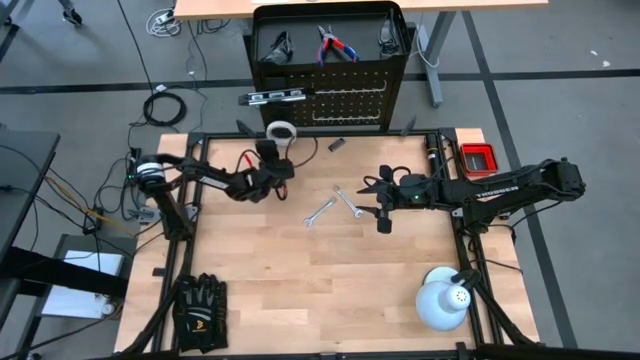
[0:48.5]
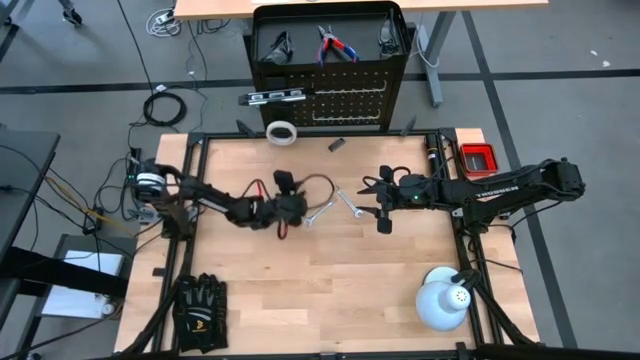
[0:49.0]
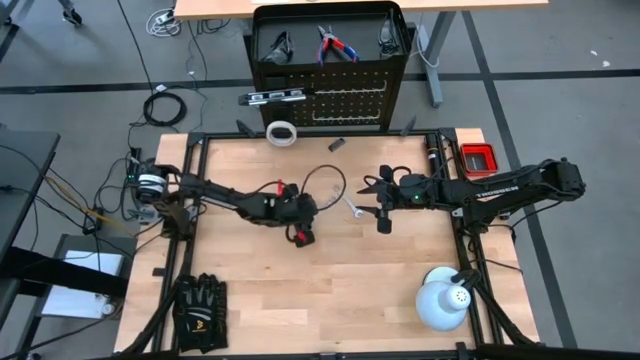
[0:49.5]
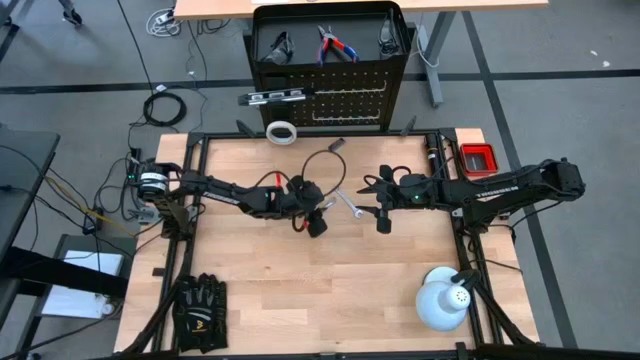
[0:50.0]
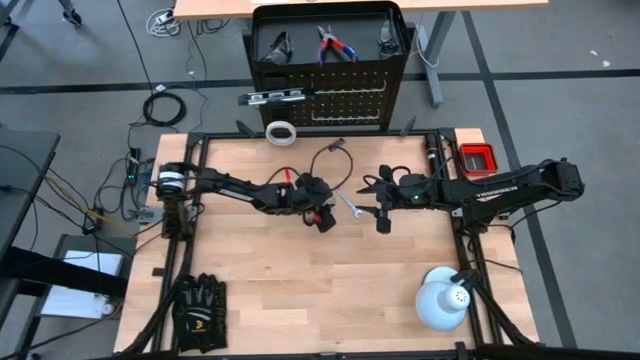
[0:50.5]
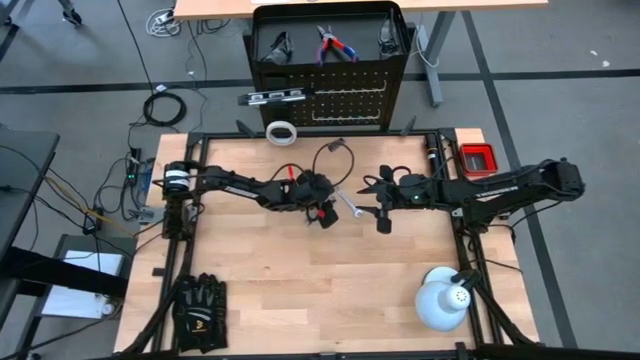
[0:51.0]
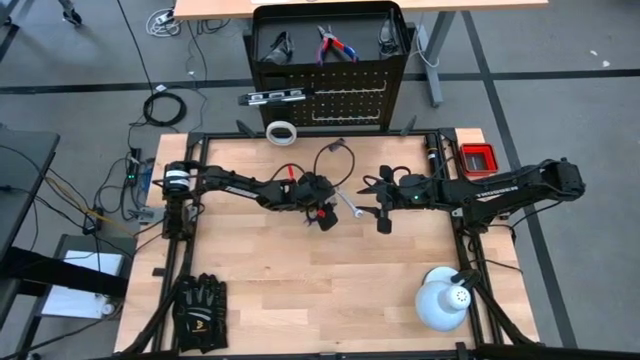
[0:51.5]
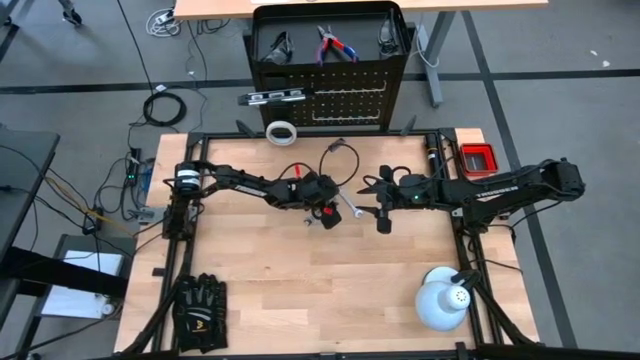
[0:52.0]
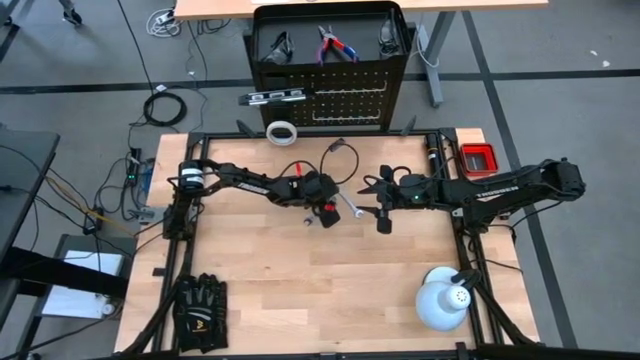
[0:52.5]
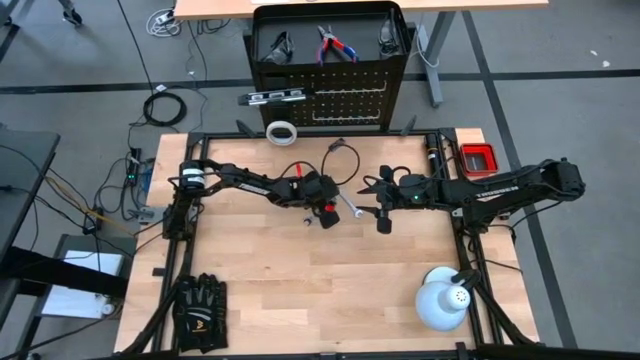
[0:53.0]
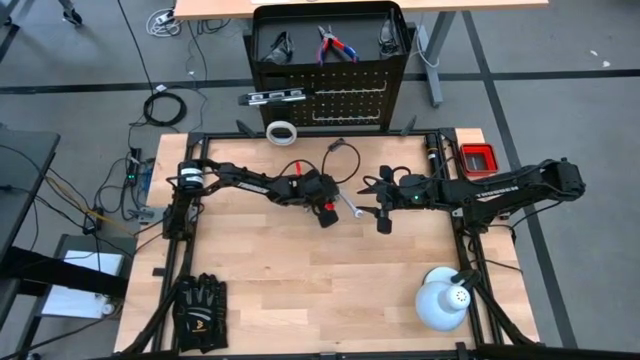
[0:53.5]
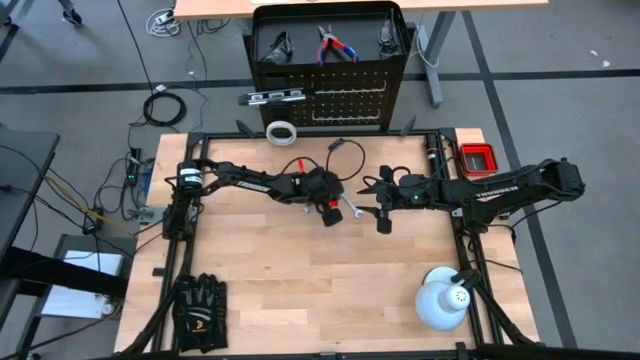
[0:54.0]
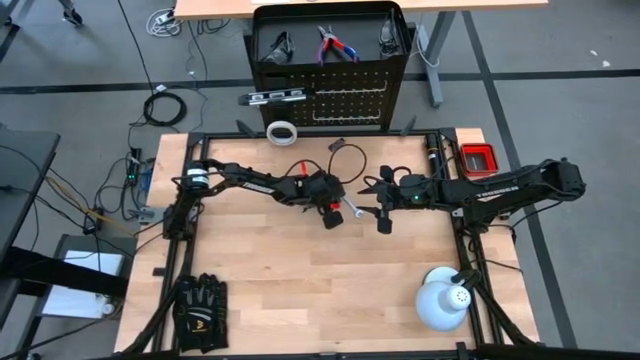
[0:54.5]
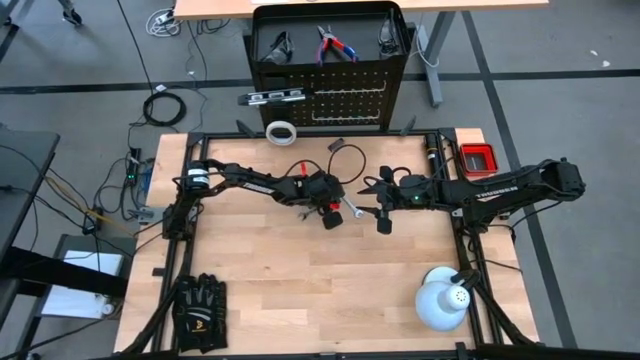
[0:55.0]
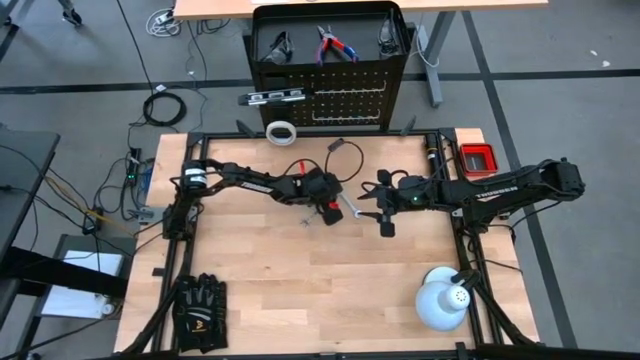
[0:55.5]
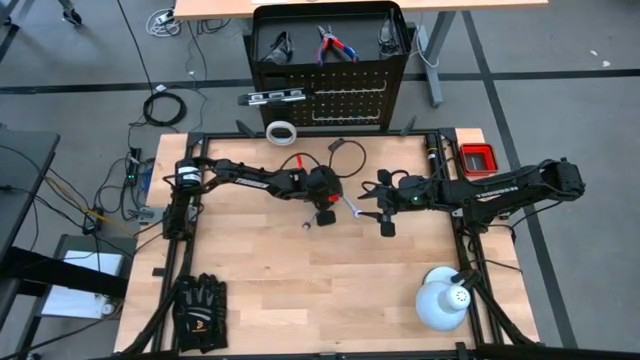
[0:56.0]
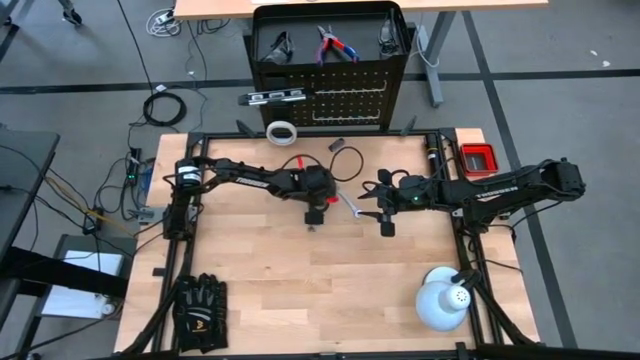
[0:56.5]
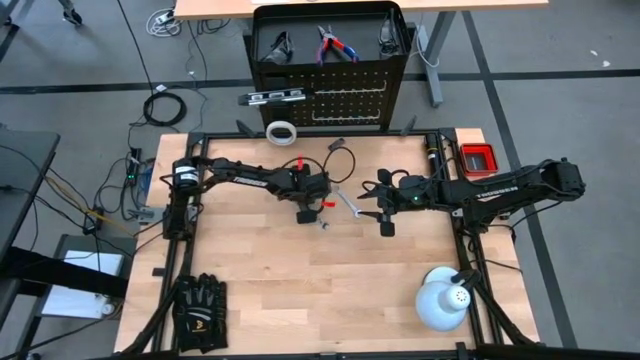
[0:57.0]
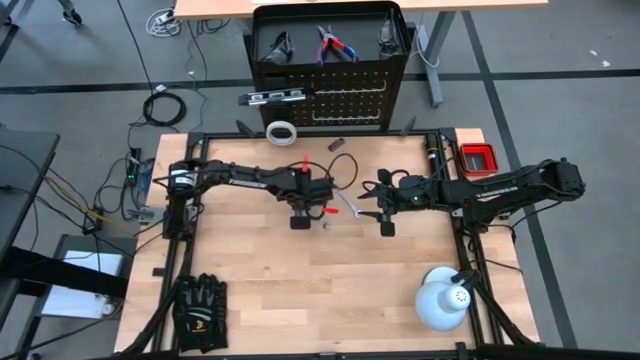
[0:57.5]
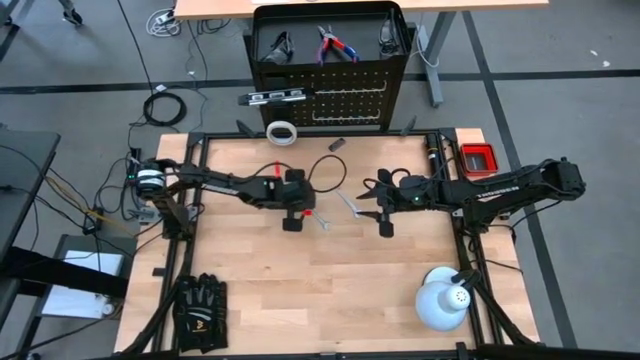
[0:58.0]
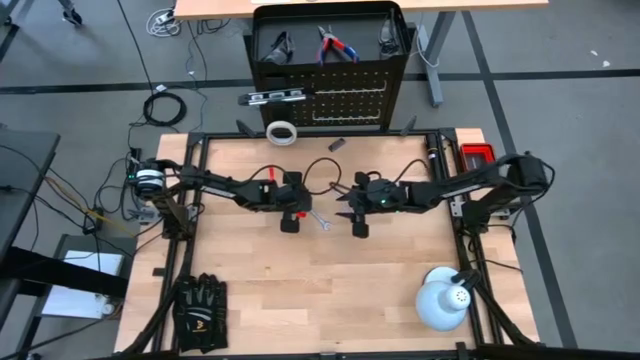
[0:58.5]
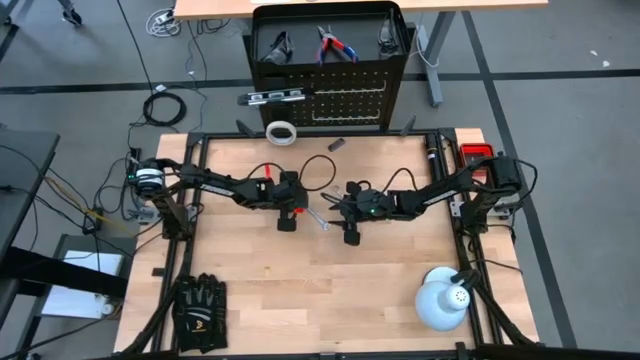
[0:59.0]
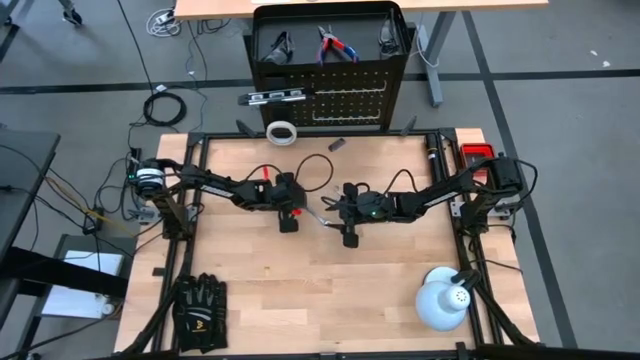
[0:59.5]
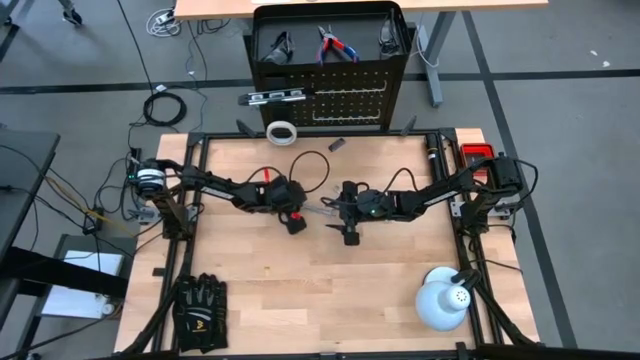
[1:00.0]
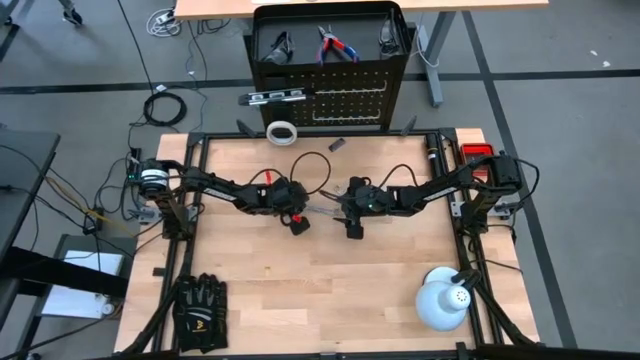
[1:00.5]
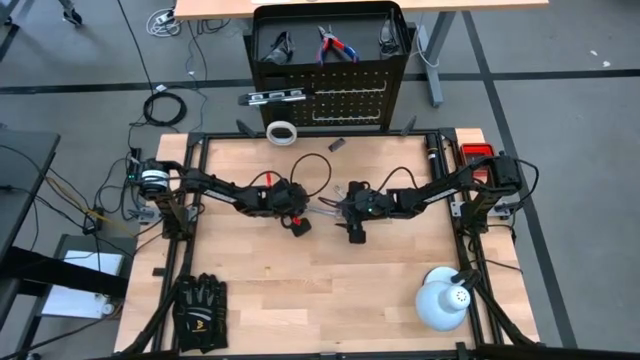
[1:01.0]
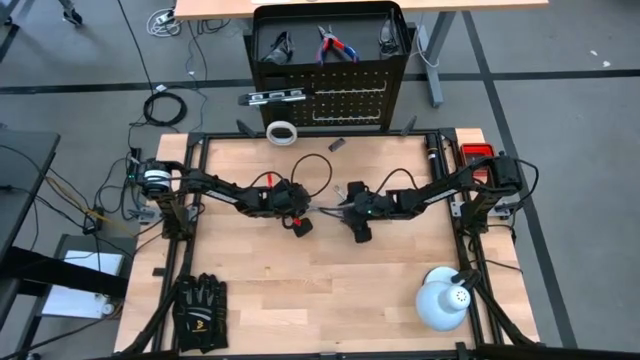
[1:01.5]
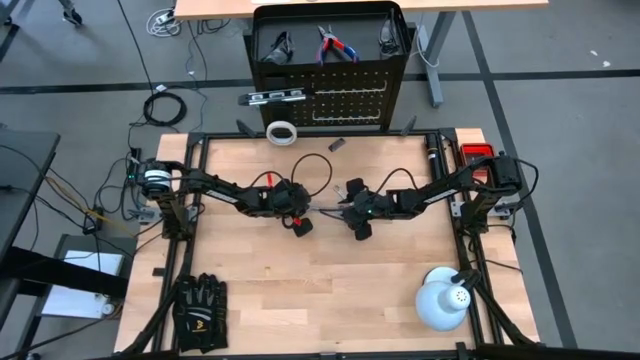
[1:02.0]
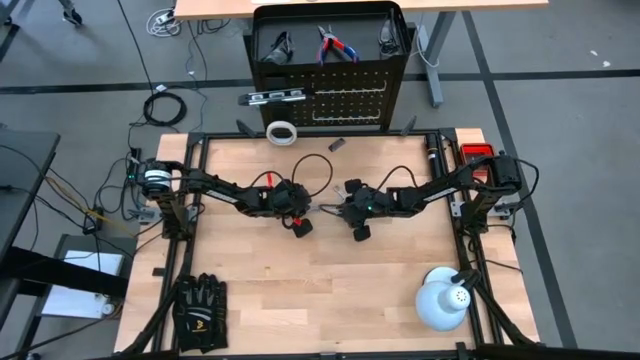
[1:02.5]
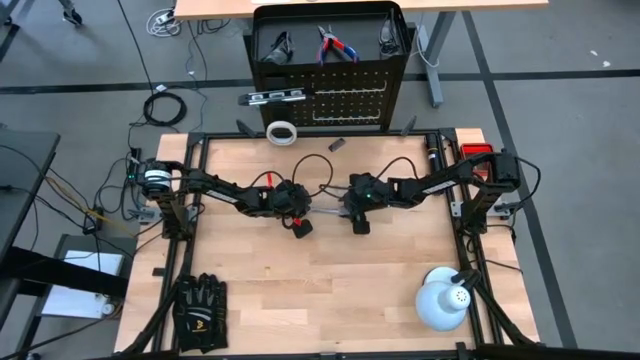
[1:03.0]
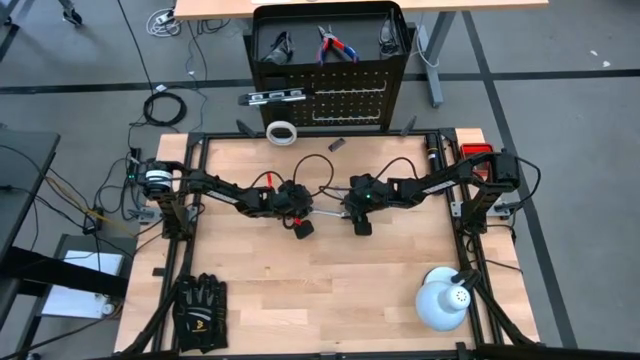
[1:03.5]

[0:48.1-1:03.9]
Task: Hang tools onto peg board
Hang the left silver wrench on the peg board

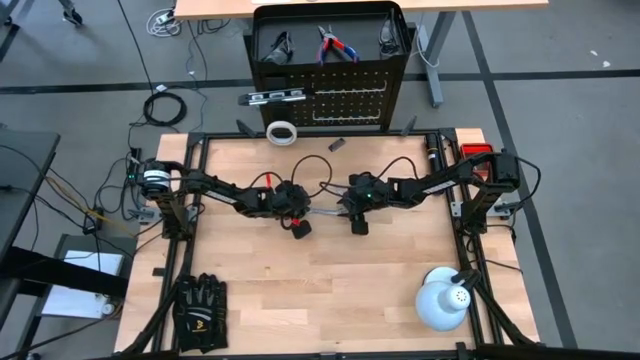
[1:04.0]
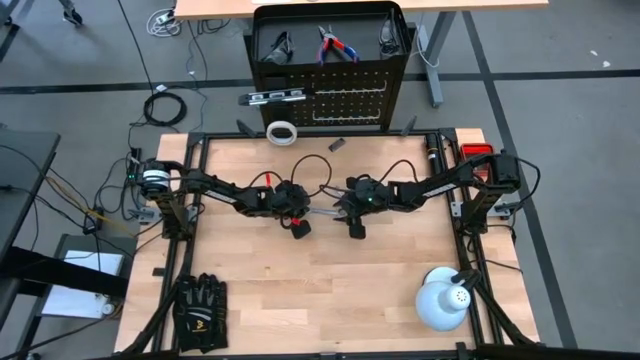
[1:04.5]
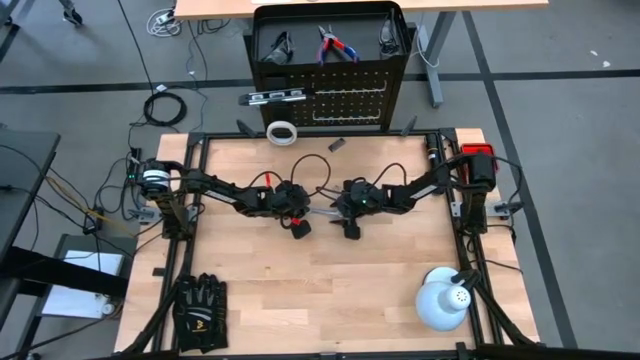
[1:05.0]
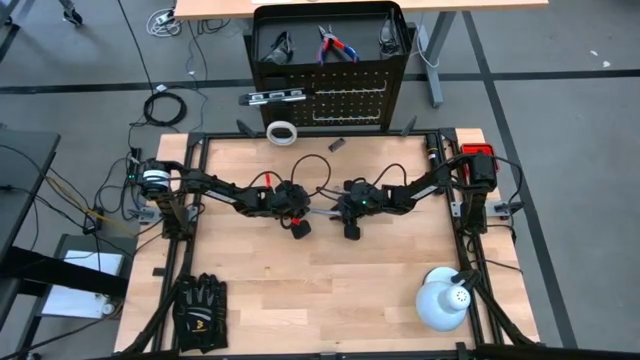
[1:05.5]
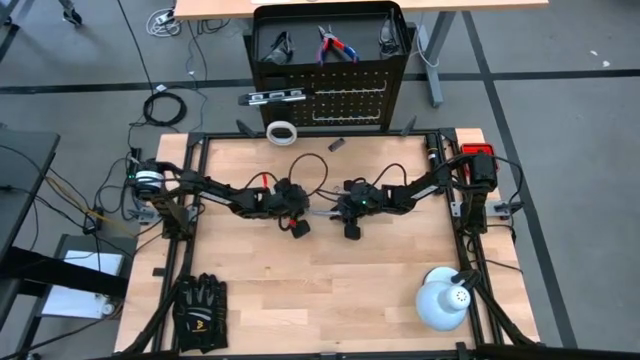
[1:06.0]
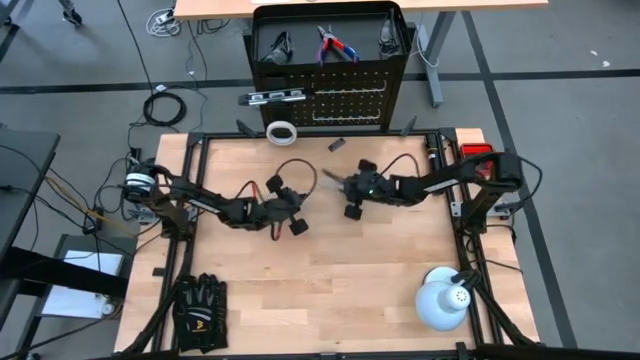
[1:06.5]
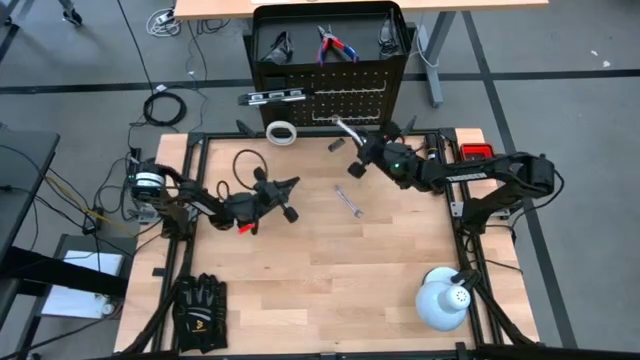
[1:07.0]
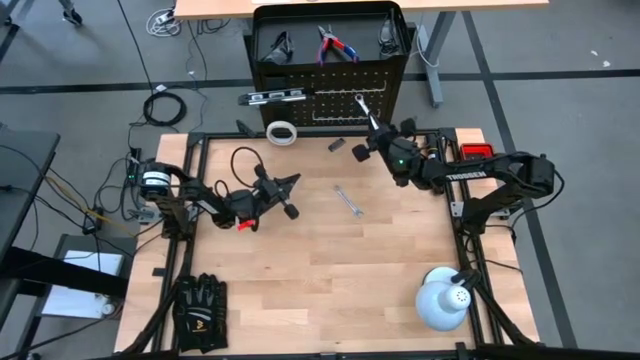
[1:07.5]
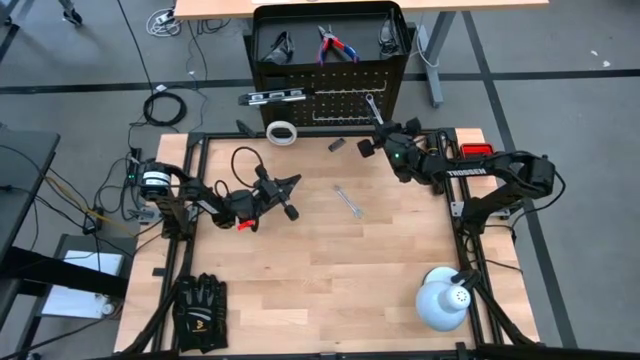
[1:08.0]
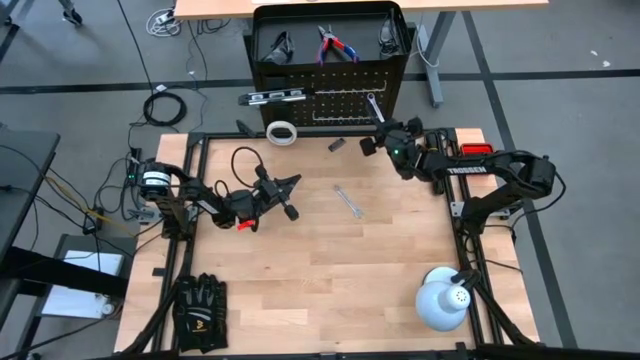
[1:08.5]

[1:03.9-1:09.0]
Hang the left silver wrench on the peg board
